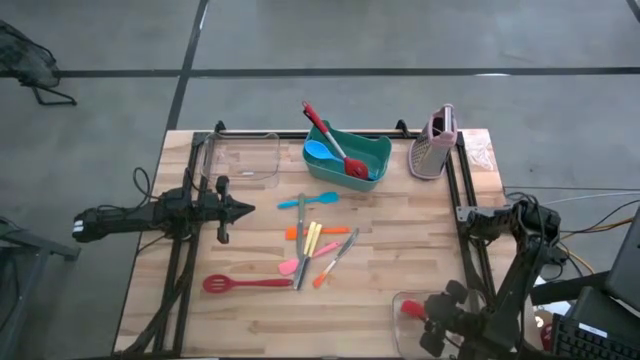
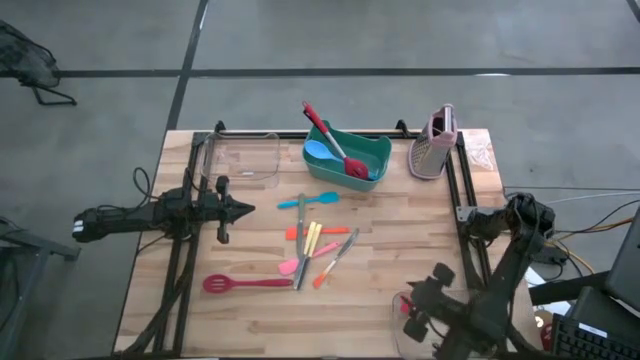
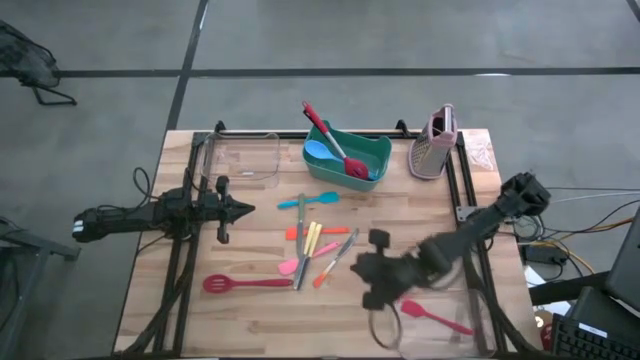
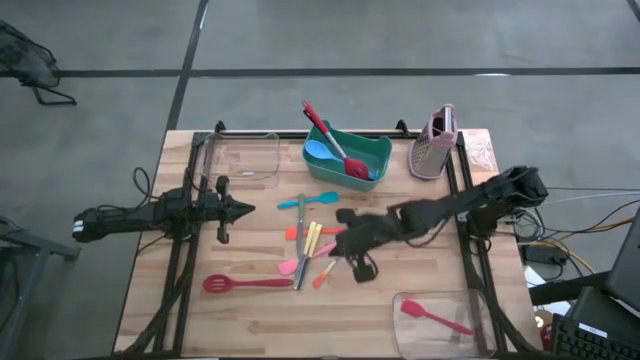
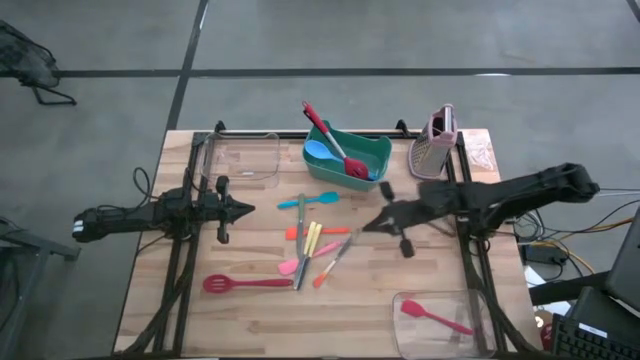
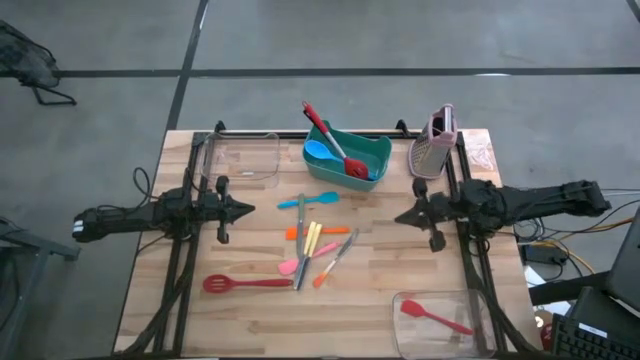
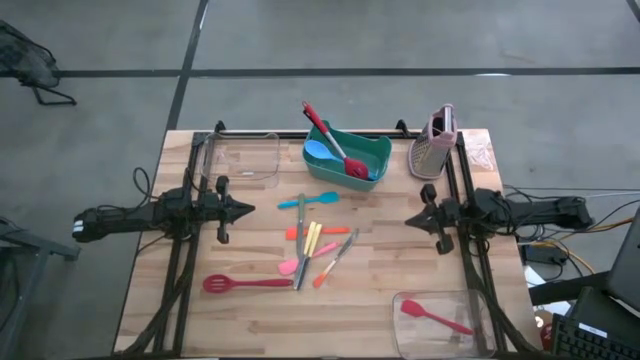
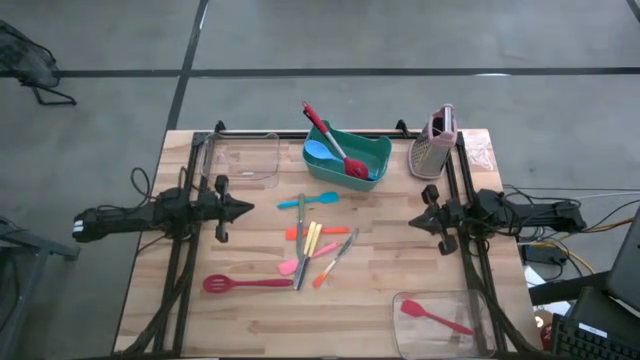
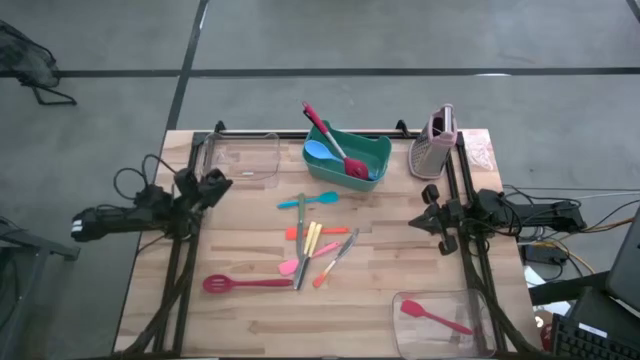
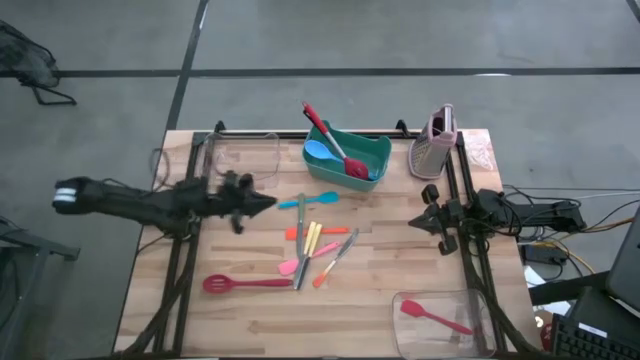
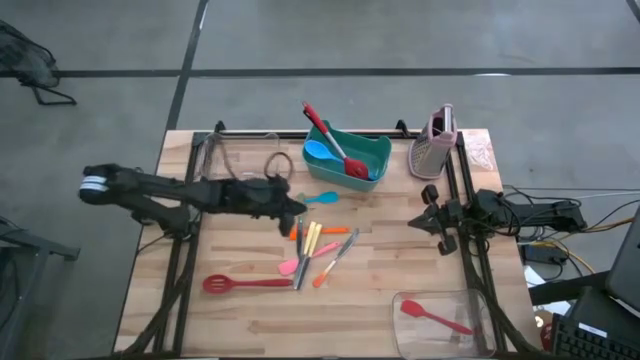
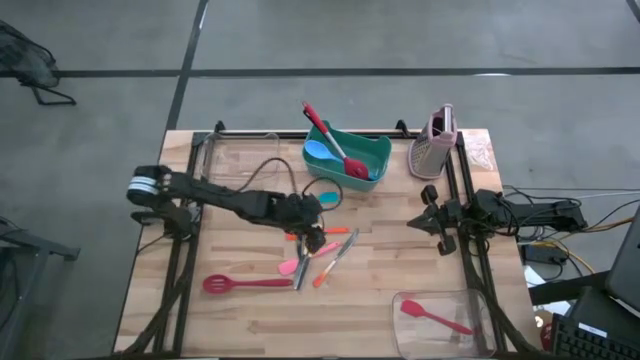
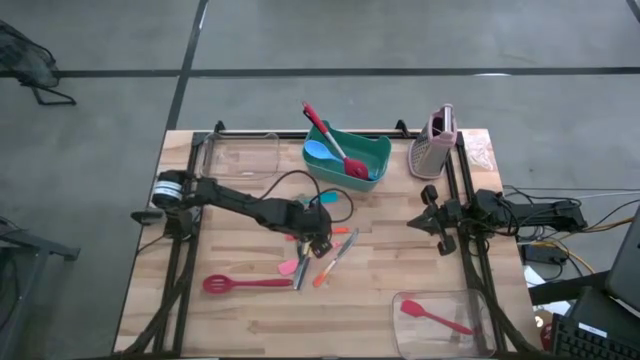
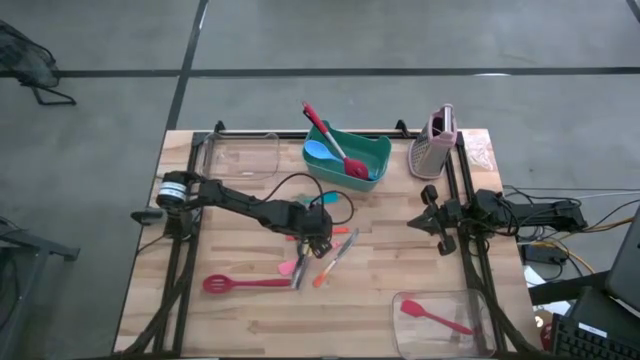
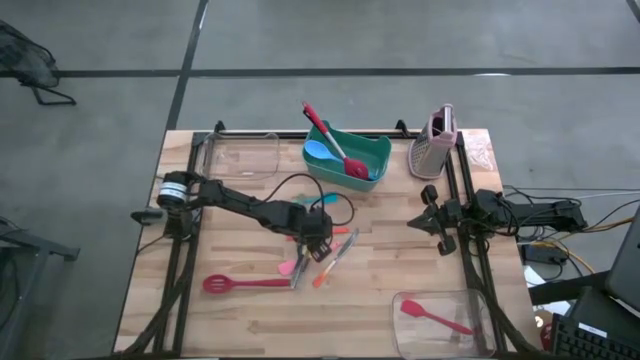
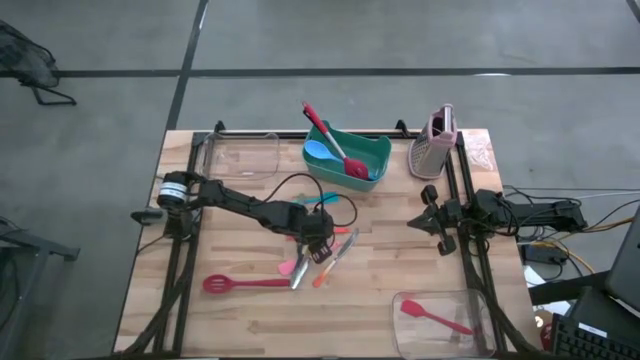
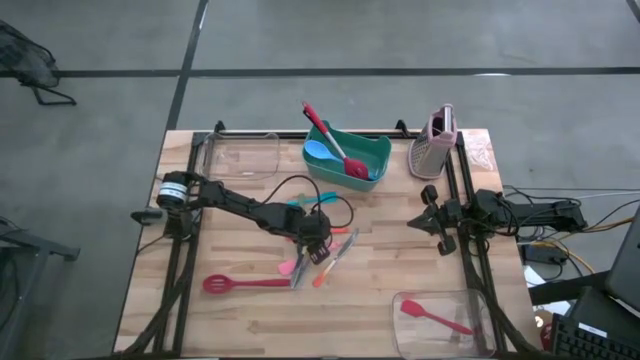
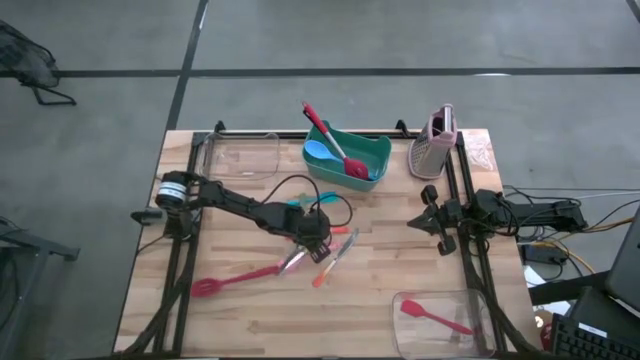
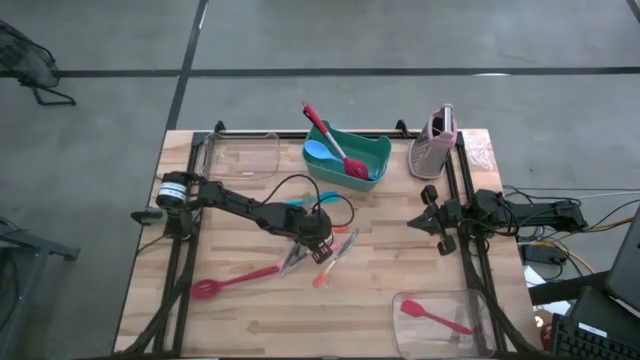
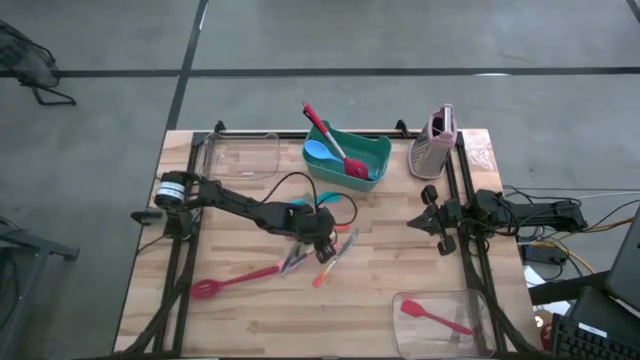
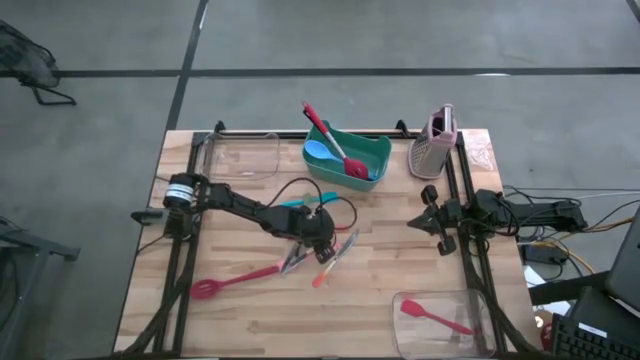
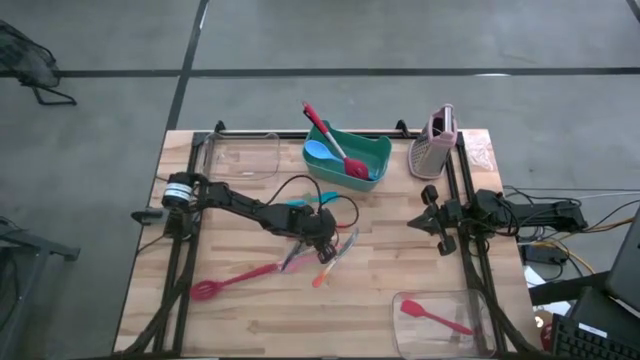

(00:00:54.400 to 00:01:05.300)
Task: Pick & Place Kitchen Items
Put the right yellow table knife into the top transparent bin

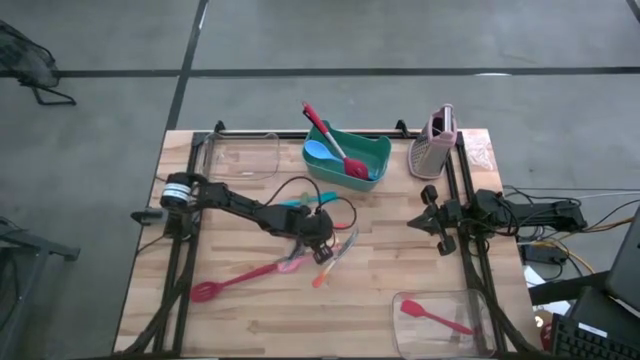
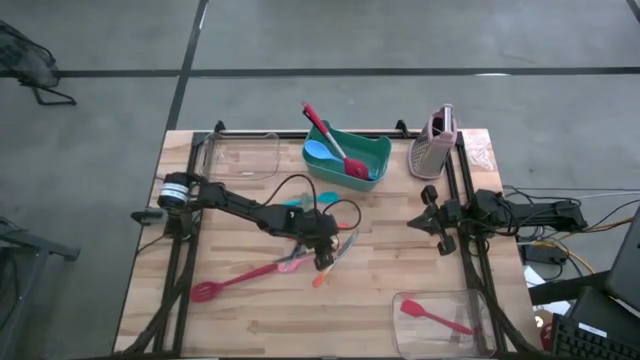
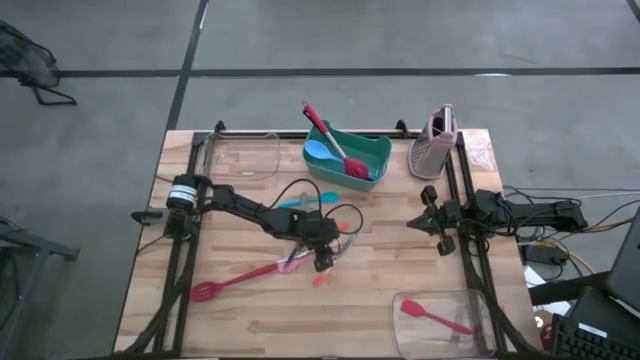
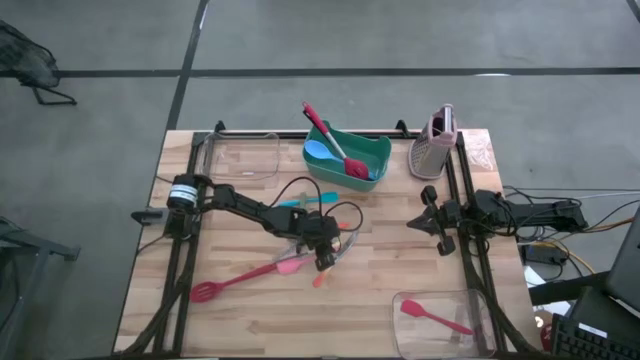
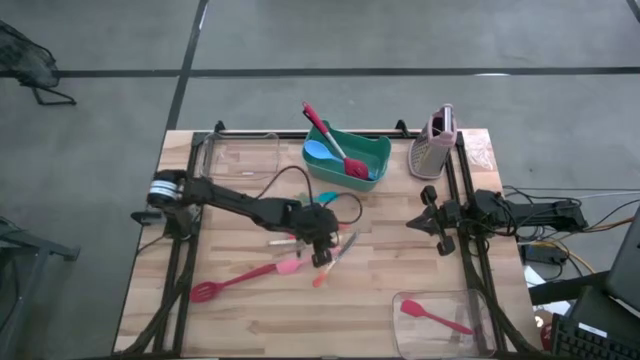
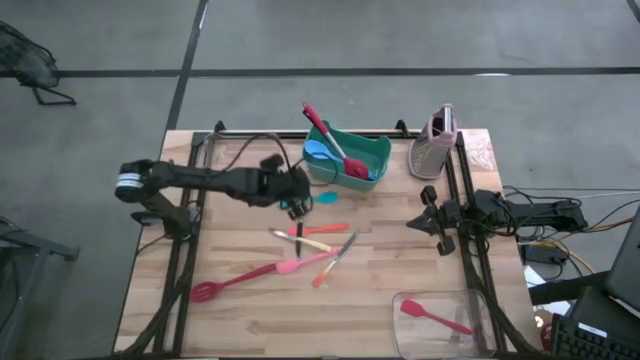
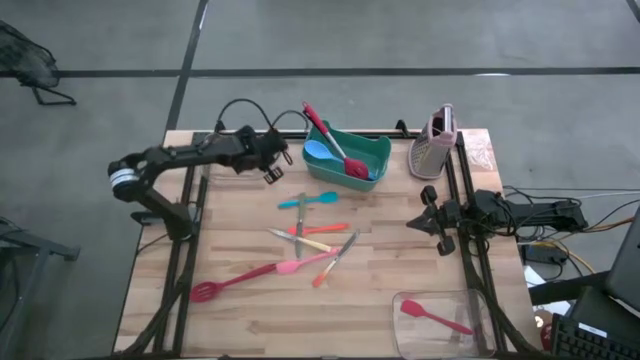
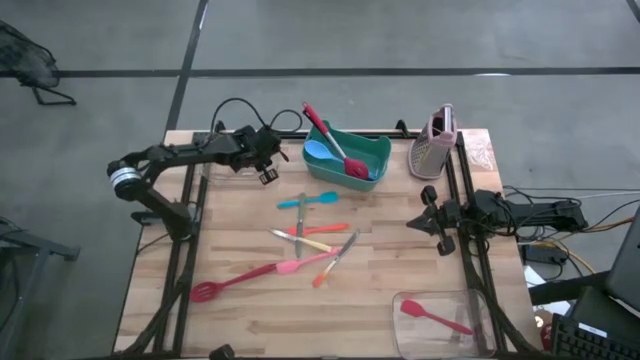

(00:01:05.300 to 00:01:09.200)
Put the right yellow table knife into the top transparent bin

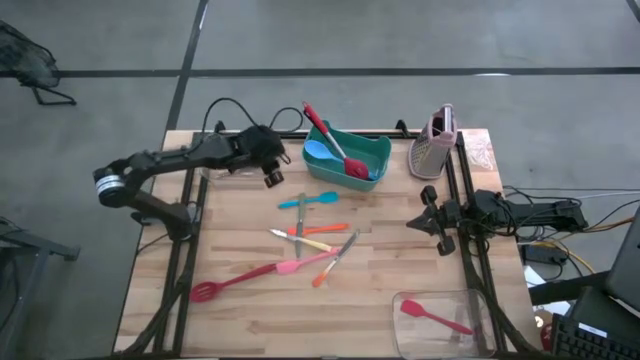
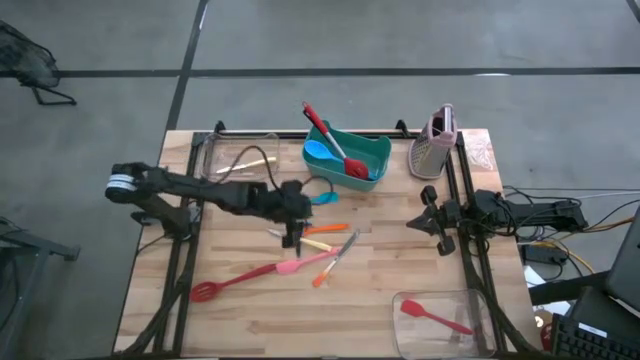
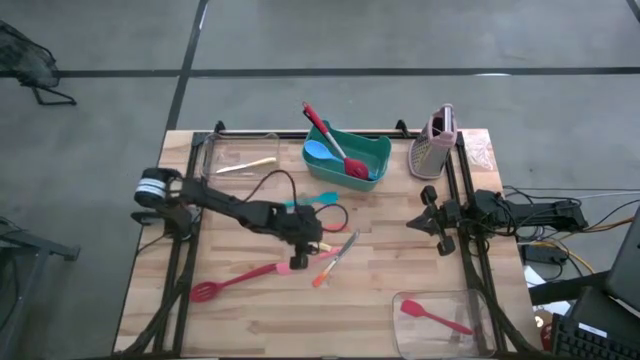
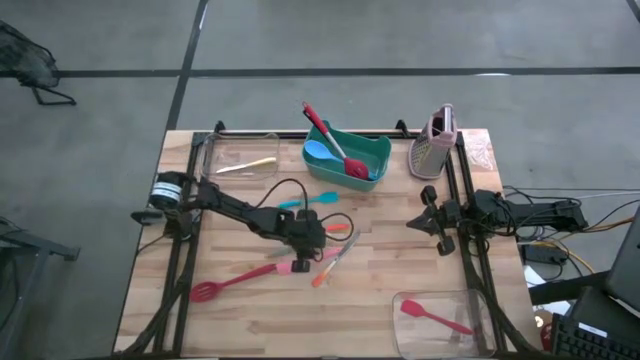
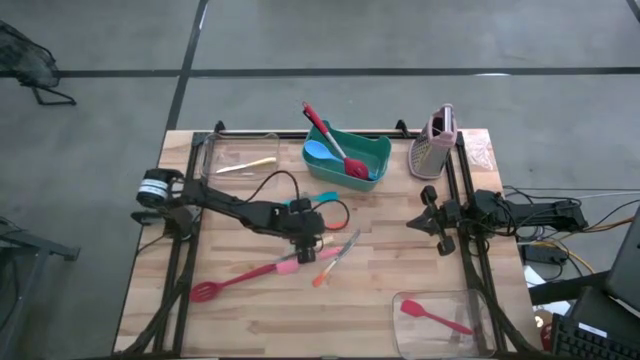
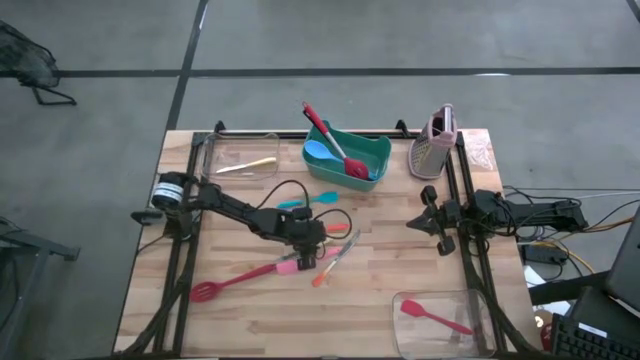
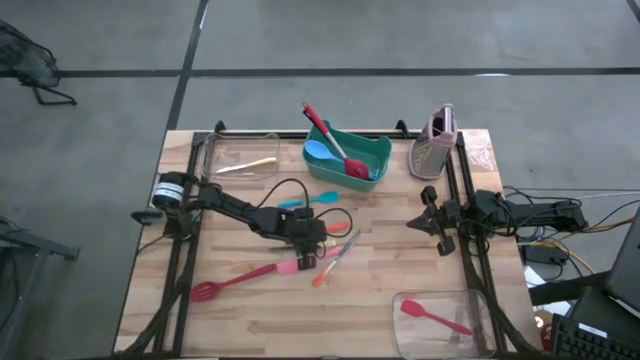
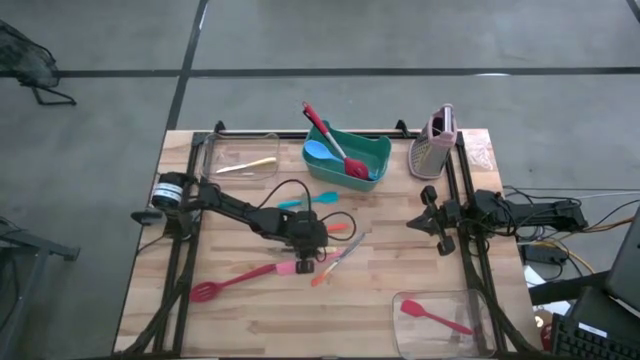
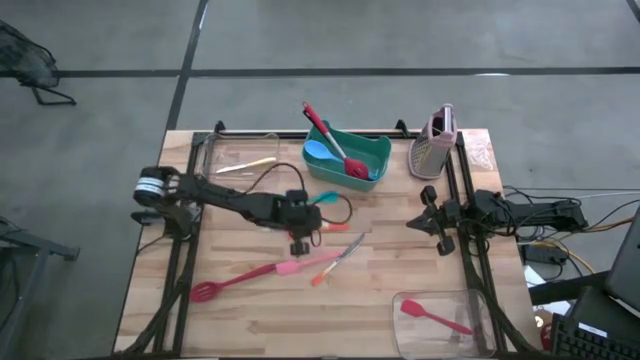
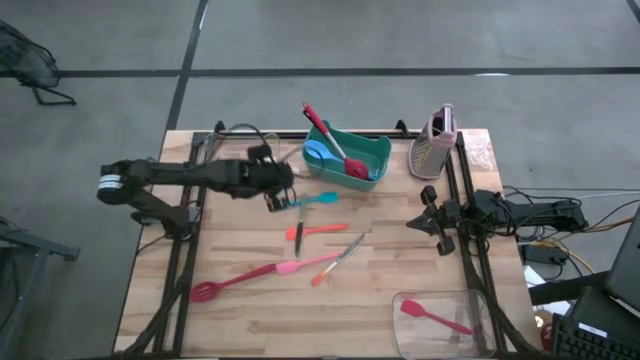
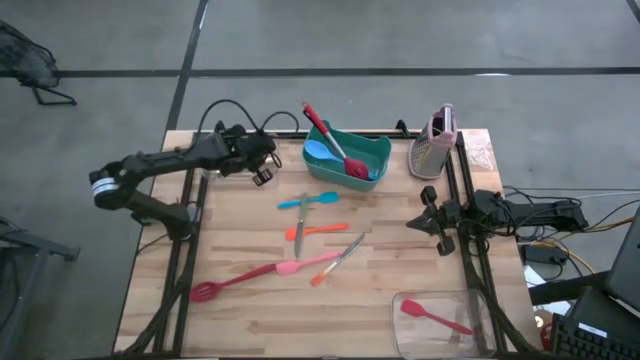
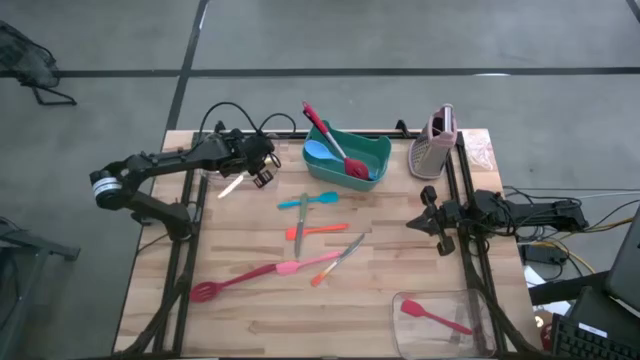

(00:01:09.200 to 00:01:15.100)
Put the yellow table knife into the top transparent bin
